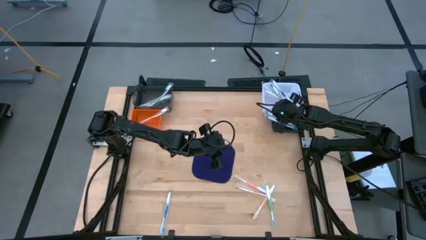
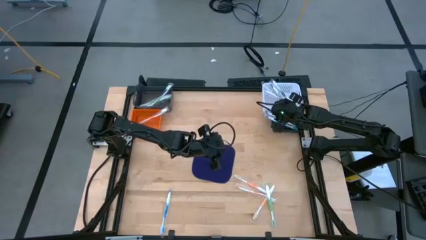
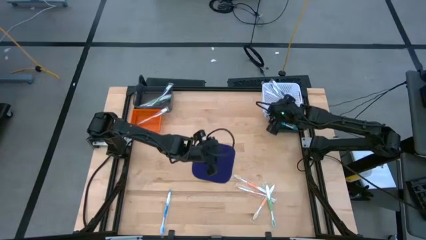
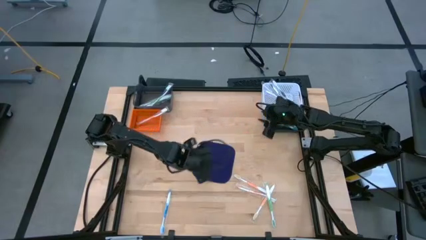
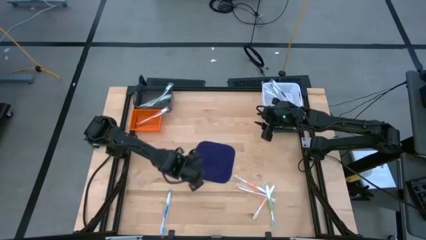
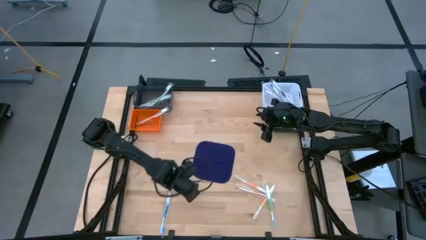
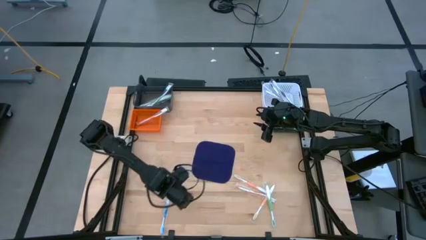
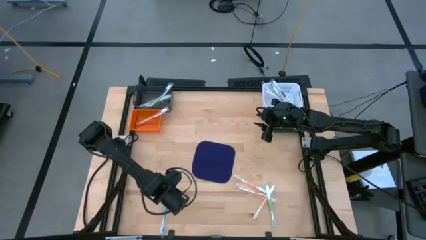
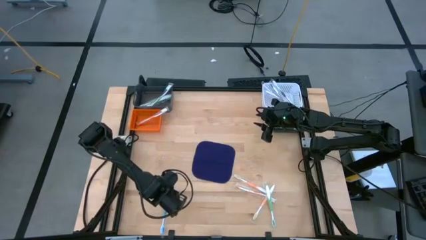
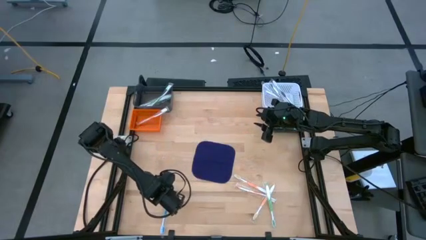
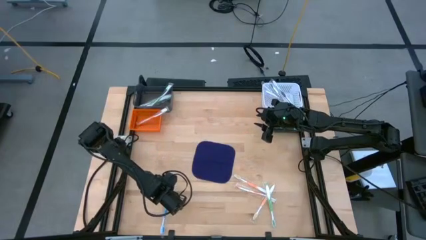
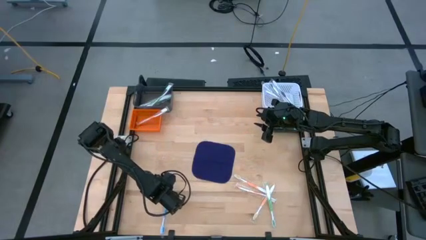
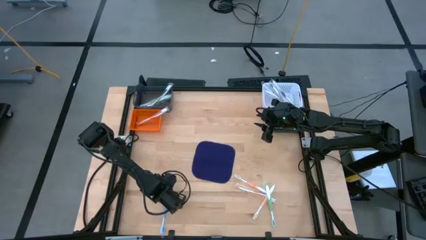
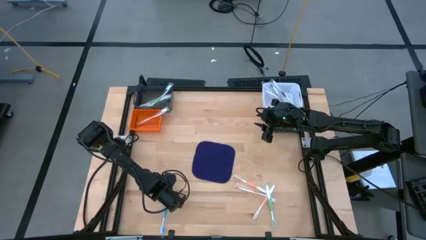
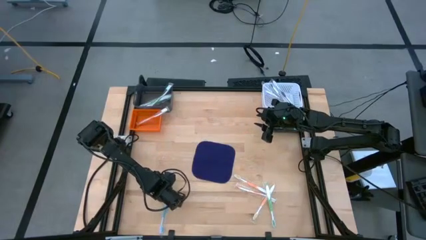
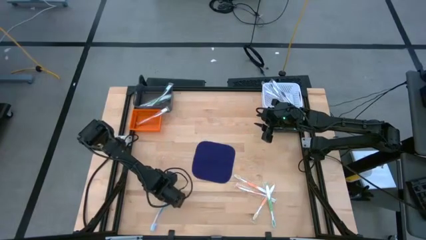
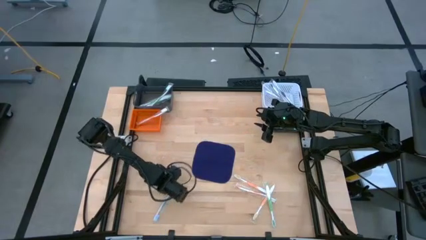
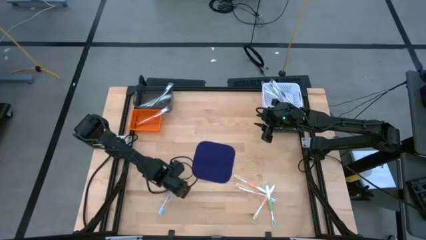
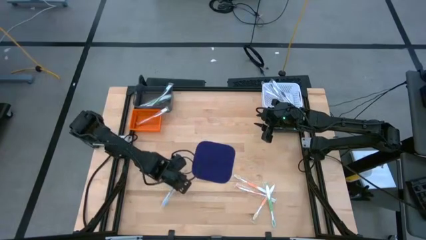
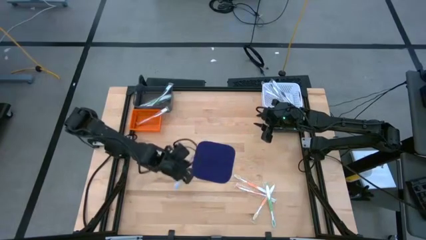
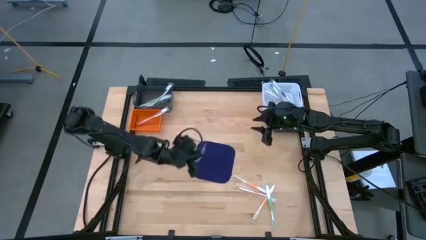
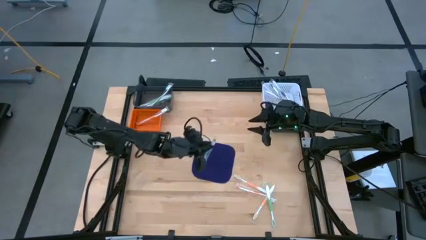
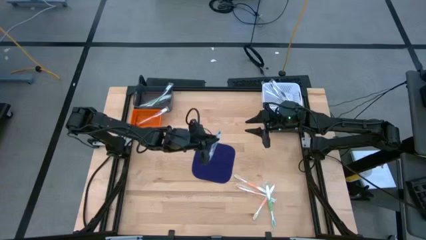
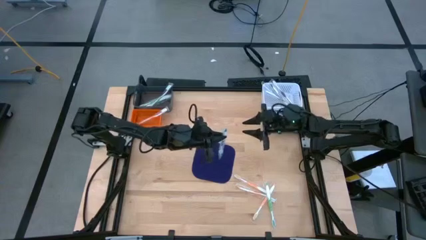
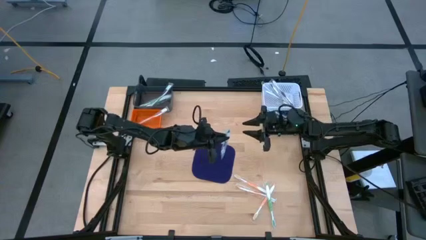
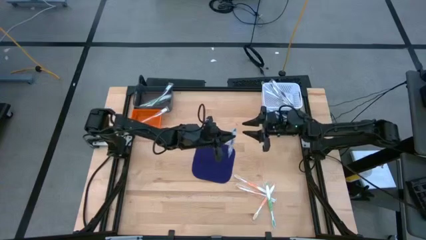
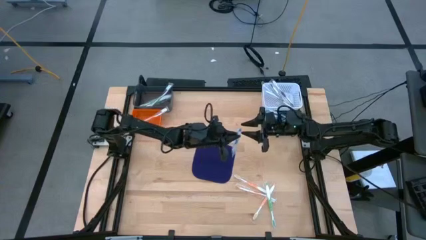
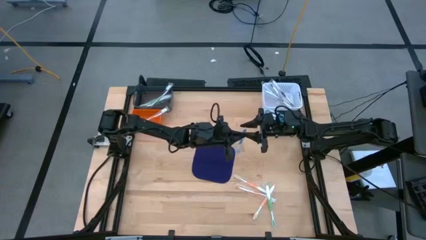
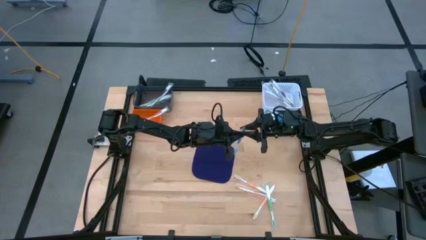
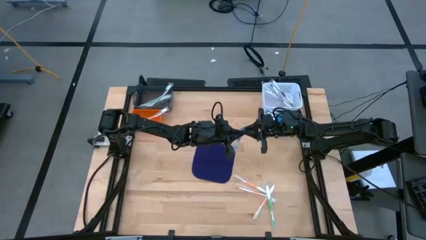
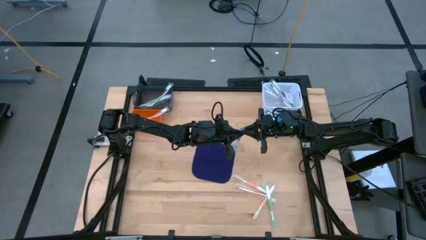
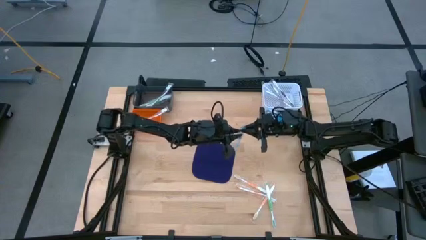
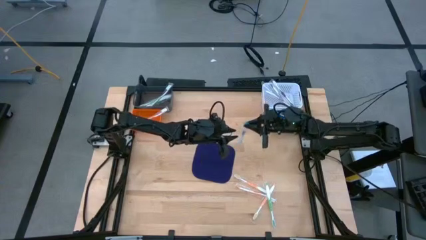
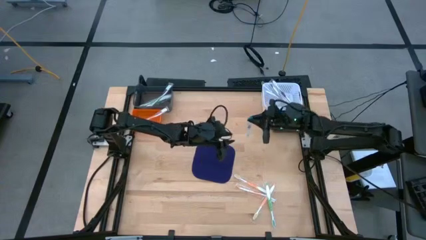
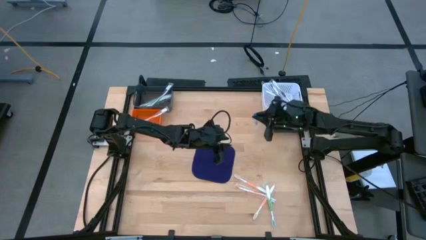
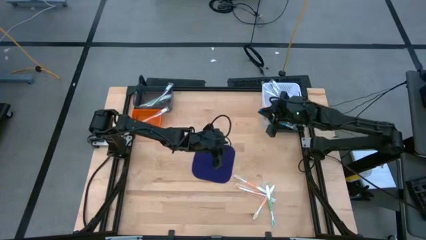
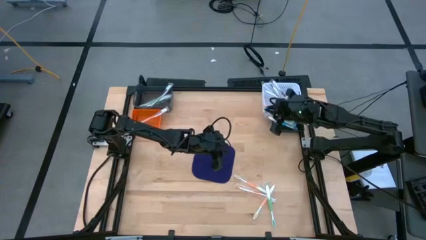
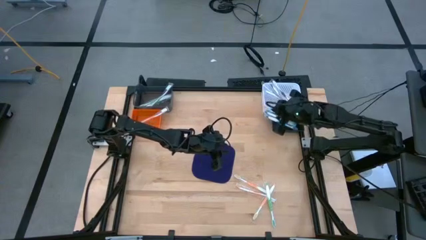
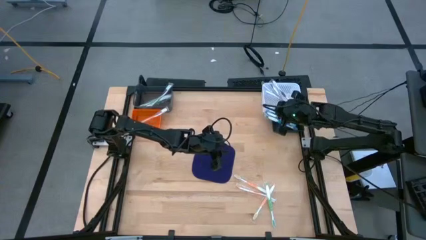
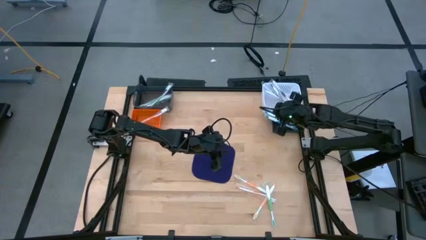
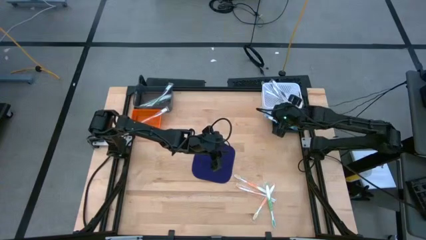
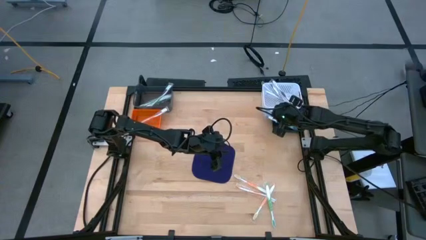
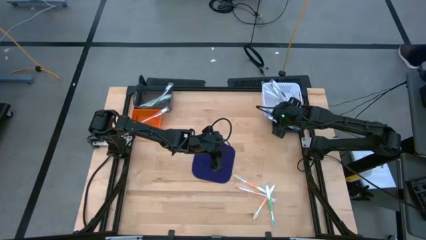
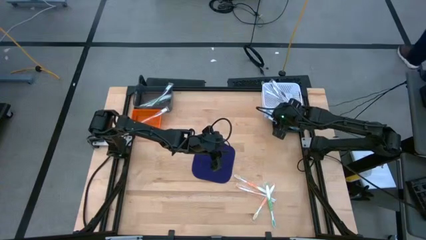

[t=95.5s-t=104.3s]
Task: Pick & Place Toothbrushes
Put the blue toothbrush into the black bin

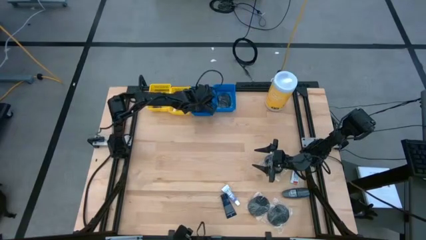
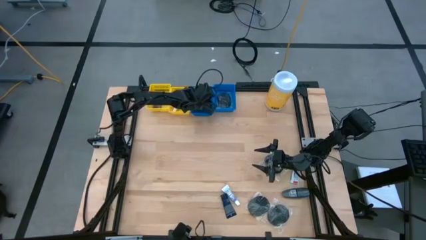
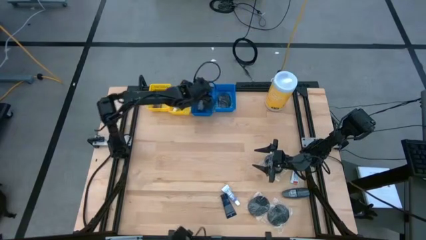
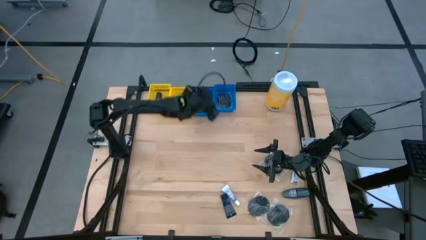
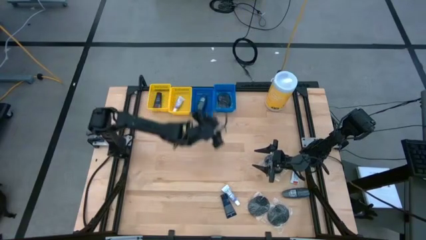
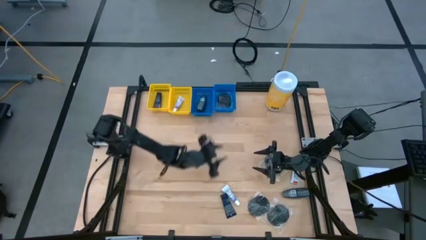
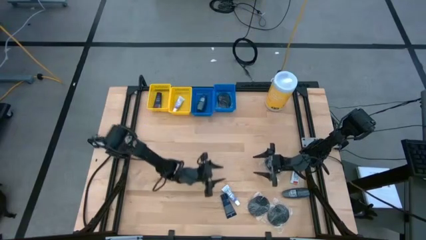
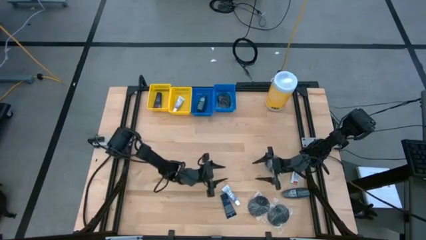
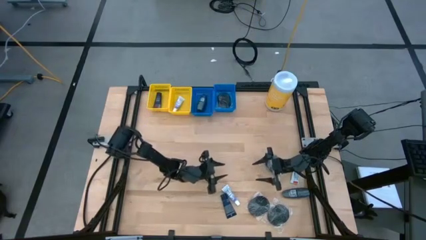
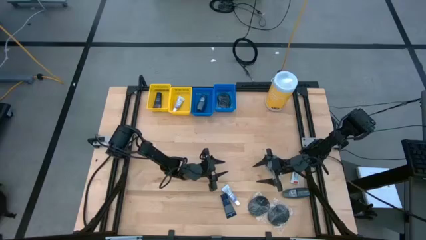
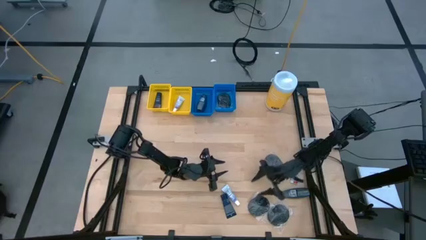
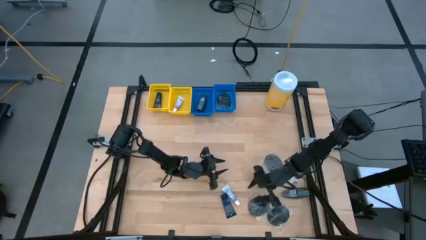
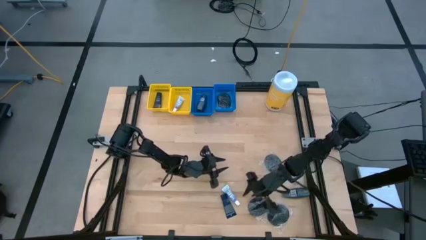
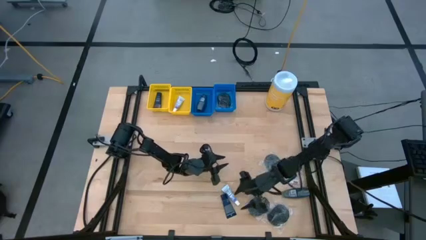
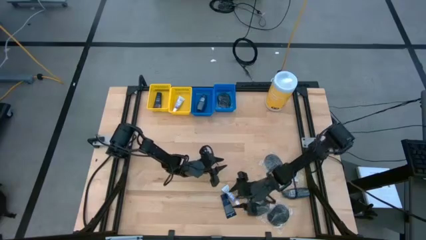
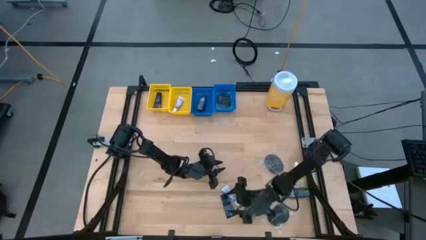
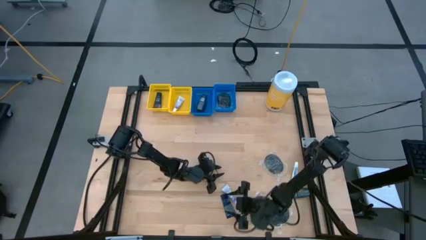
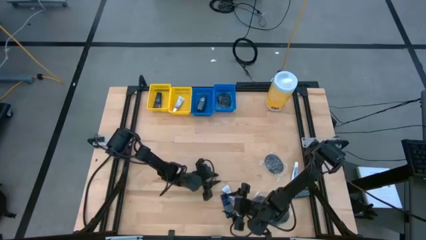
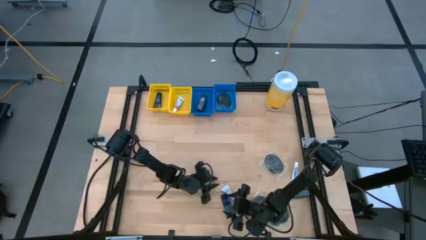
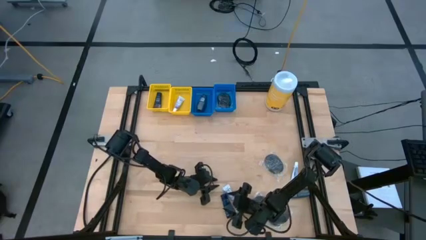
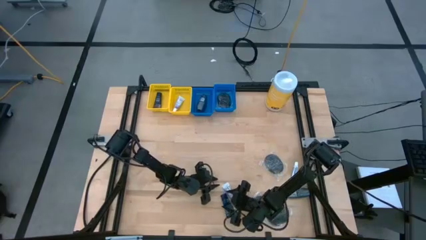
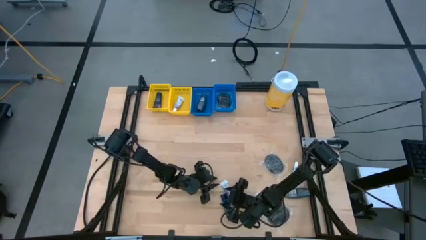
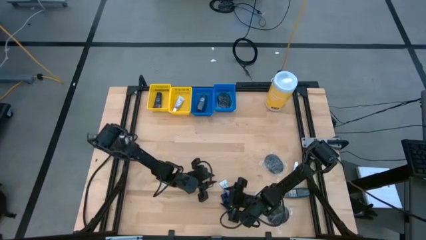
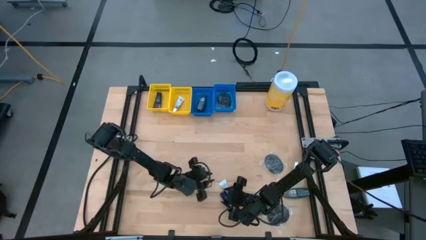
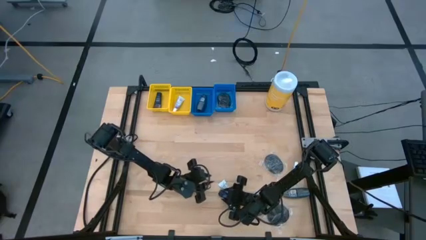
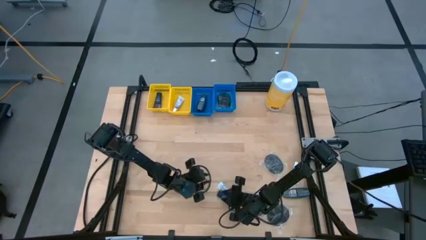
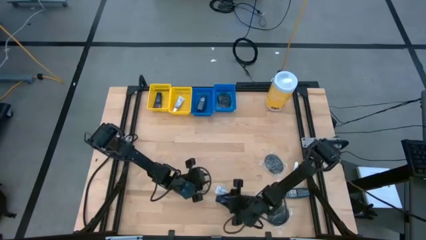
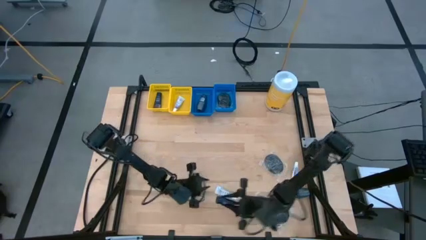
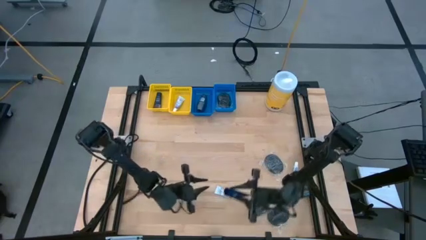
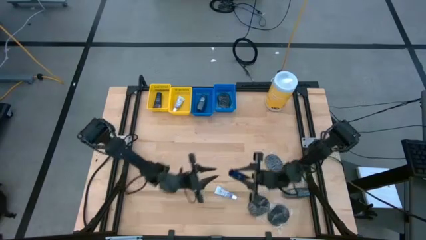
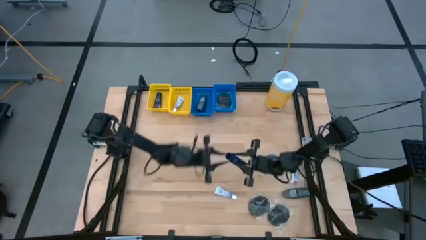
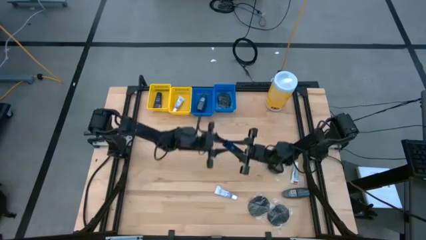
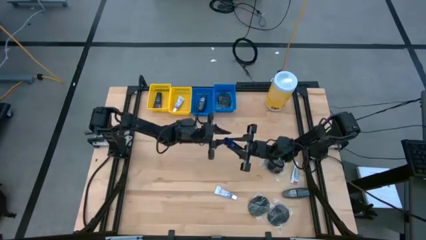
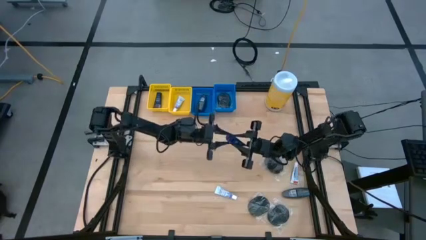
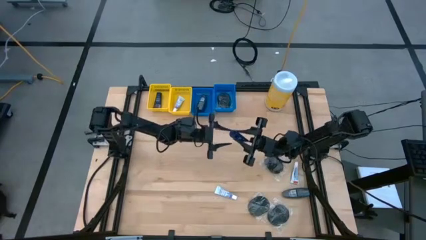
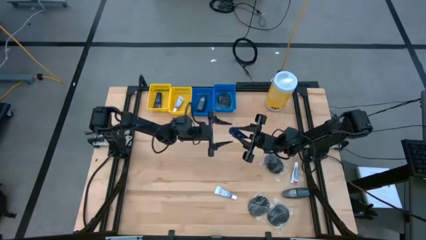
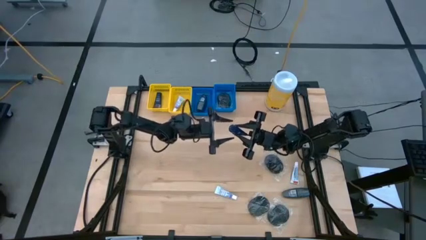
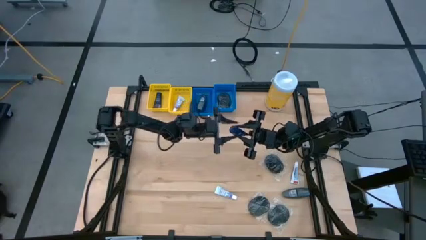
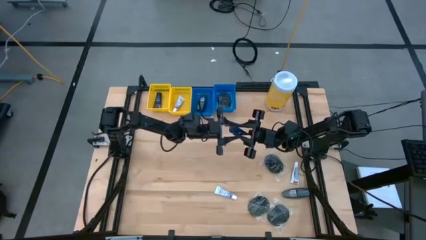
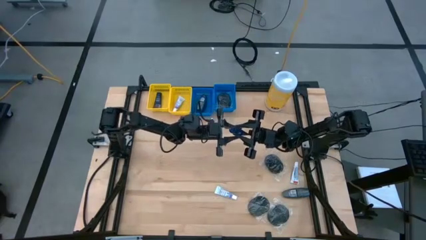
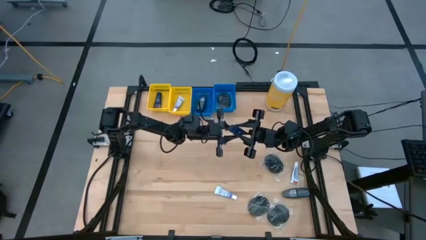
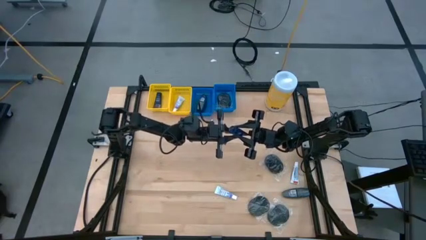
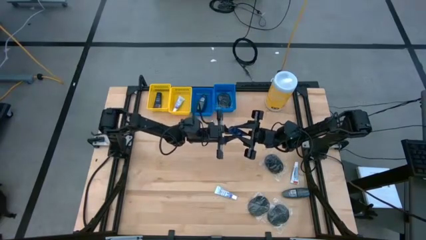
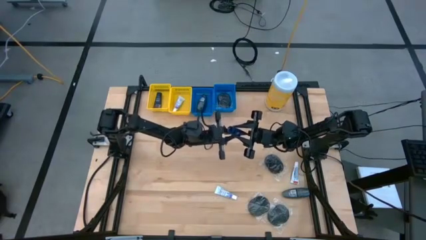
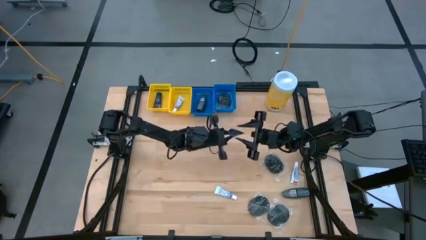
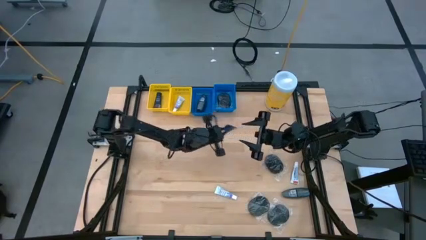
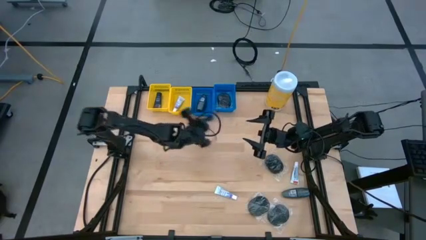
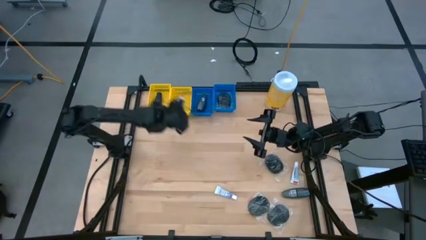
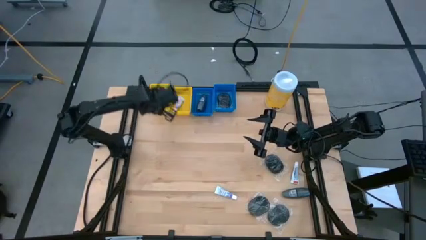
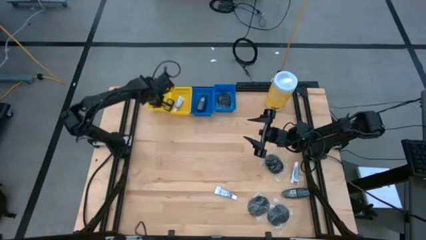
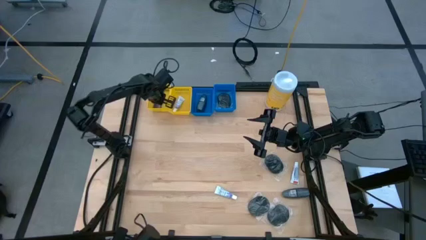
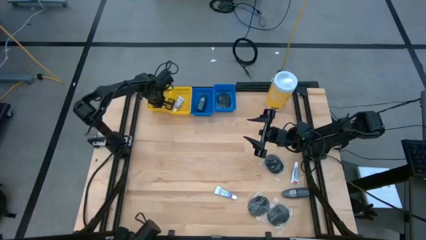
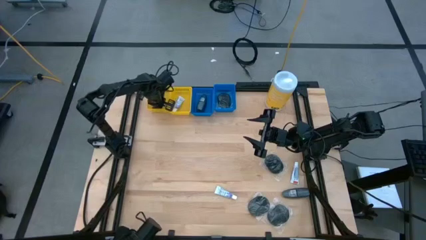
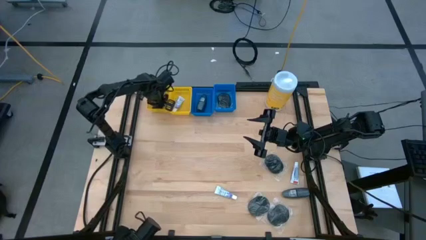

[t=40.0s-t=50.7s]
Task: Pick & Place Travel size toiletries
Put the blue shave cream into the left yellow bin
